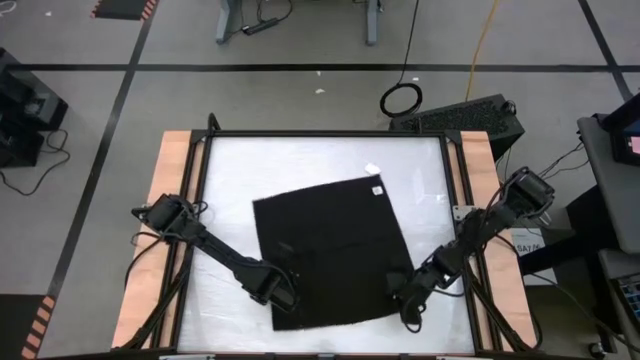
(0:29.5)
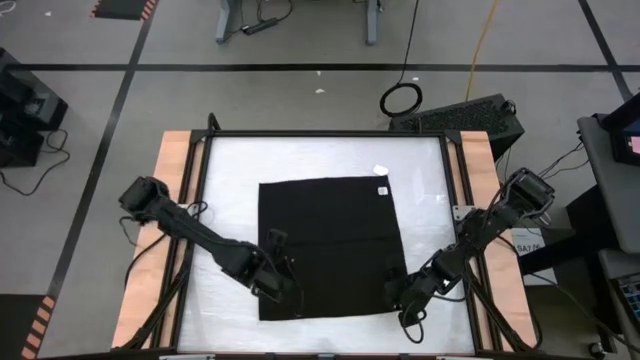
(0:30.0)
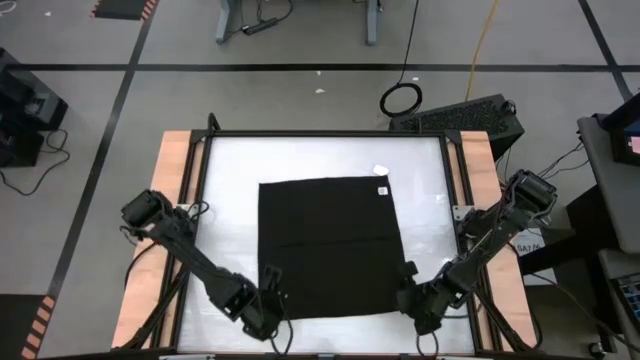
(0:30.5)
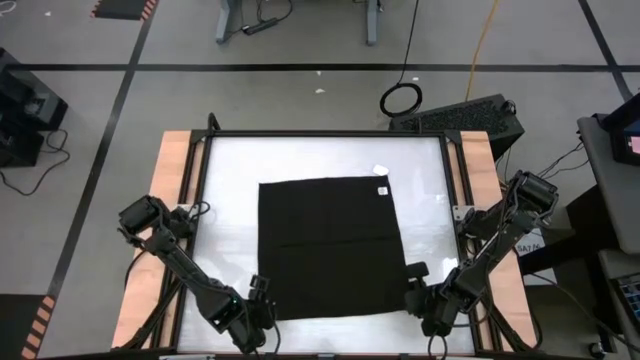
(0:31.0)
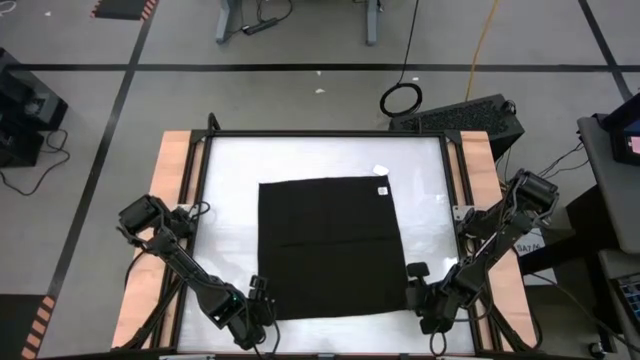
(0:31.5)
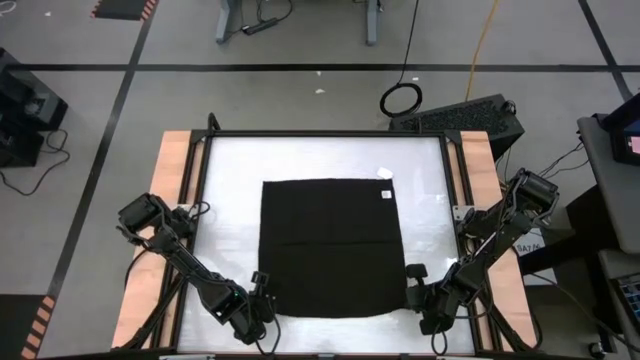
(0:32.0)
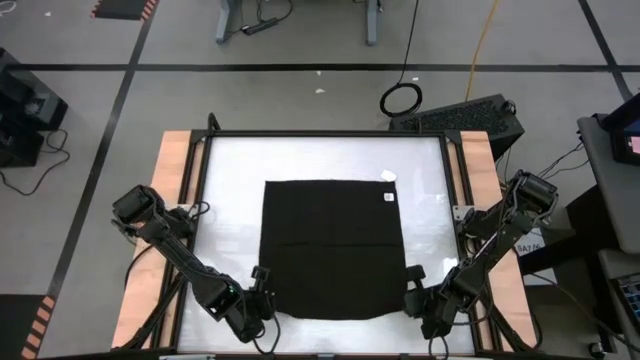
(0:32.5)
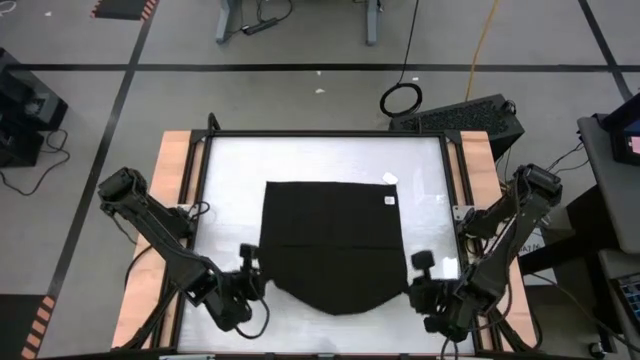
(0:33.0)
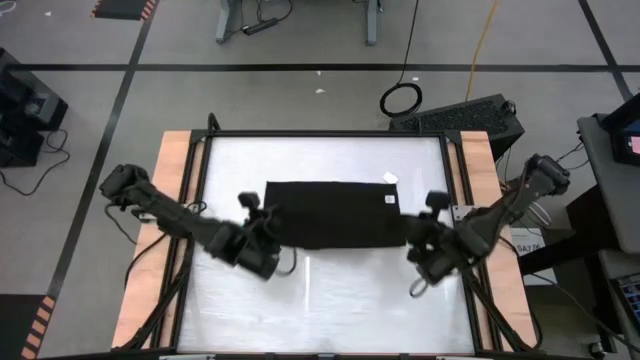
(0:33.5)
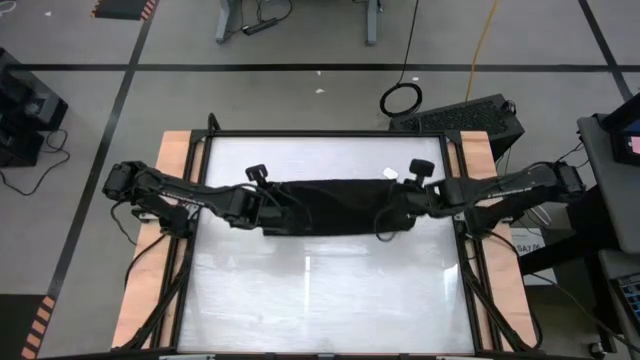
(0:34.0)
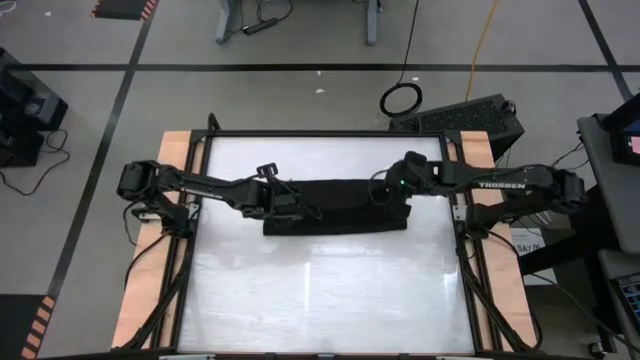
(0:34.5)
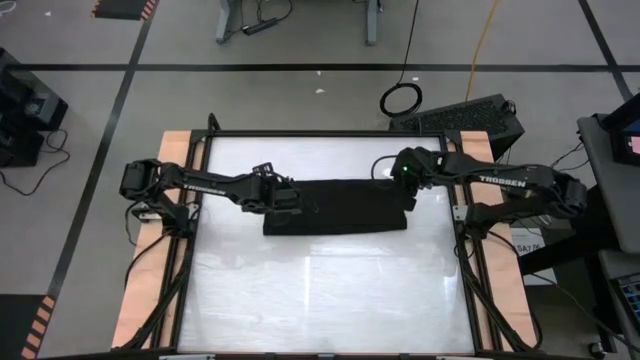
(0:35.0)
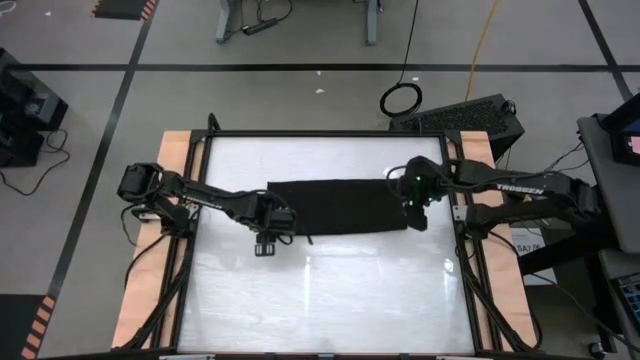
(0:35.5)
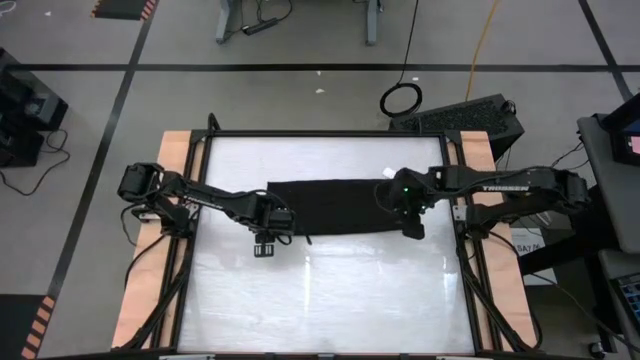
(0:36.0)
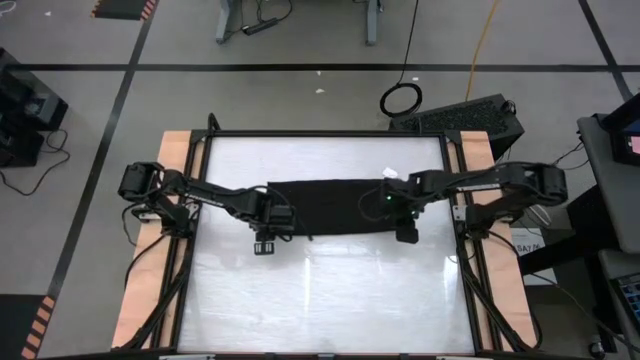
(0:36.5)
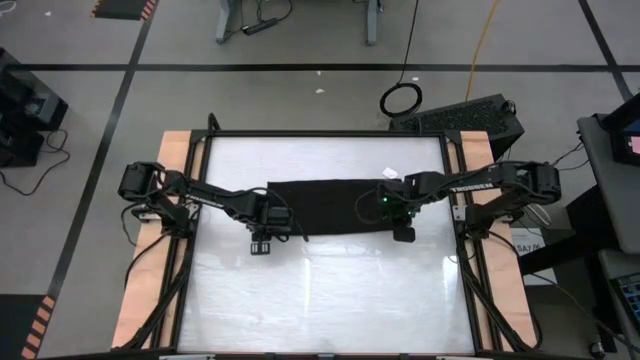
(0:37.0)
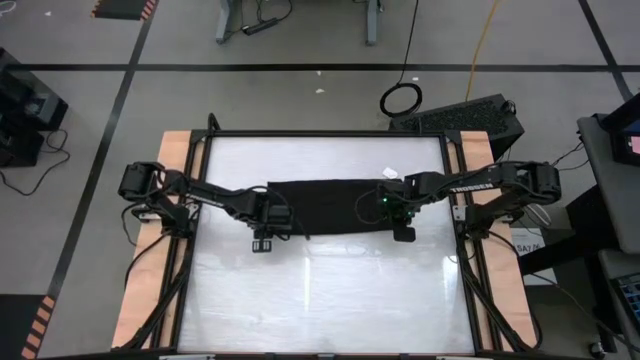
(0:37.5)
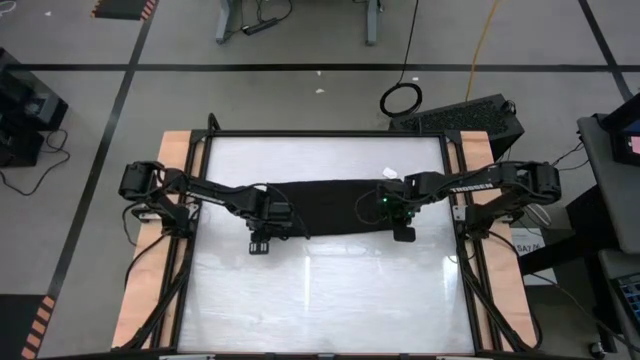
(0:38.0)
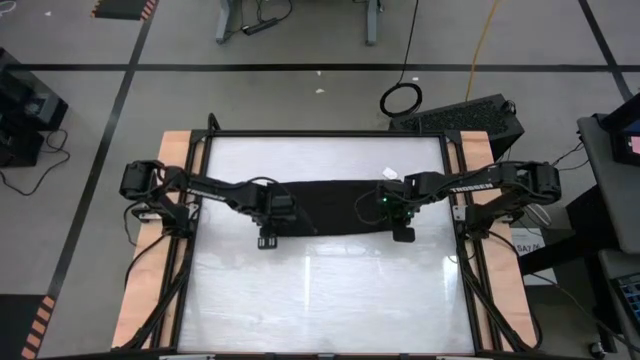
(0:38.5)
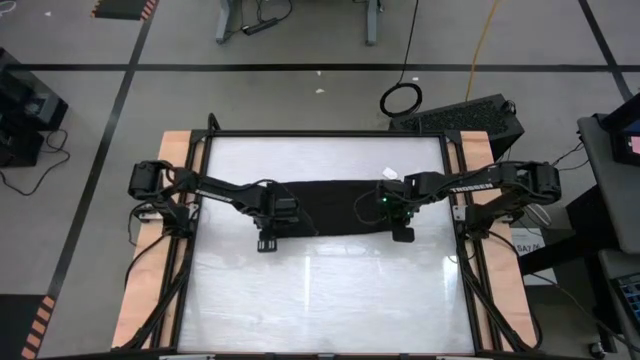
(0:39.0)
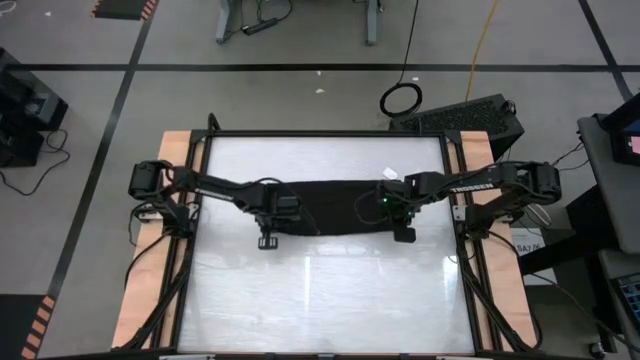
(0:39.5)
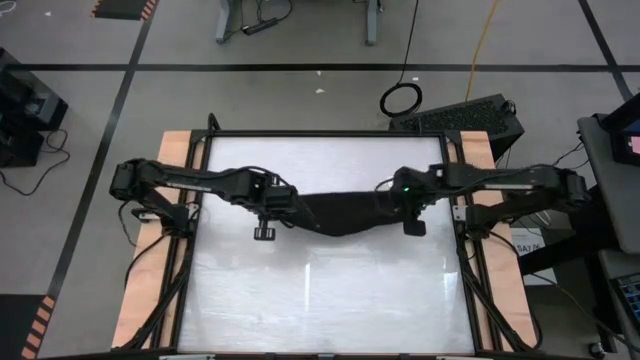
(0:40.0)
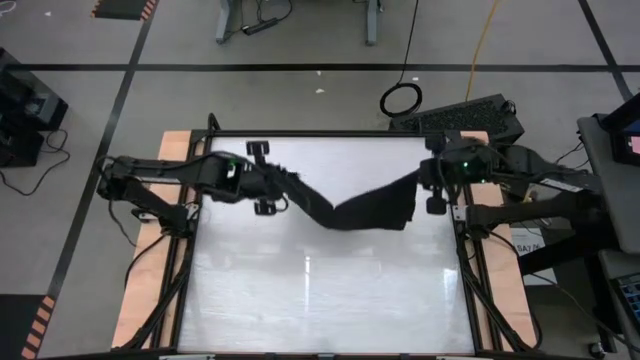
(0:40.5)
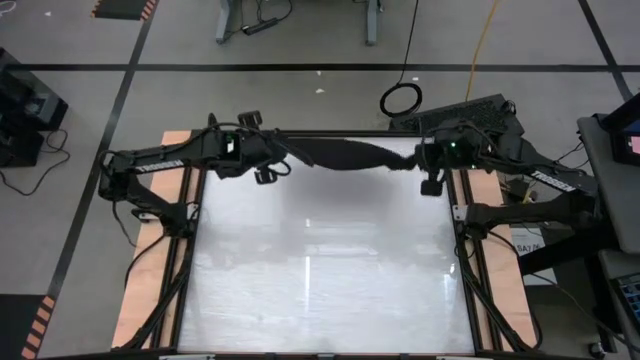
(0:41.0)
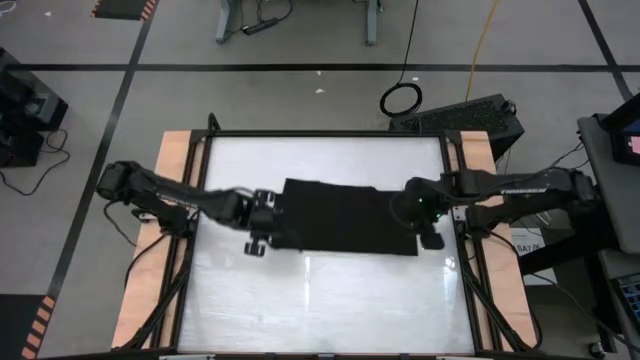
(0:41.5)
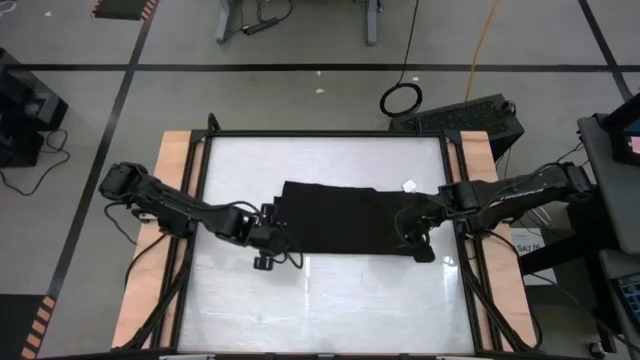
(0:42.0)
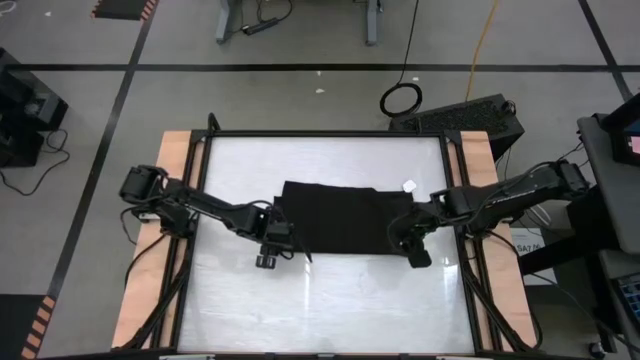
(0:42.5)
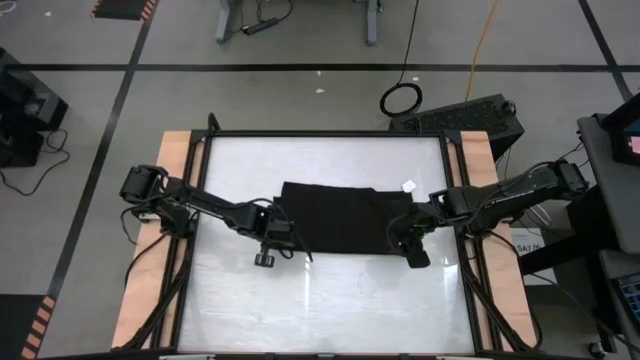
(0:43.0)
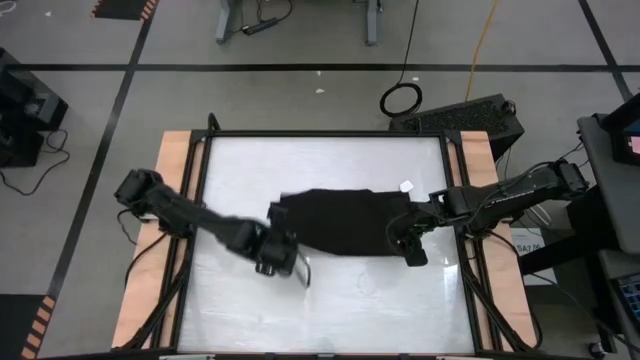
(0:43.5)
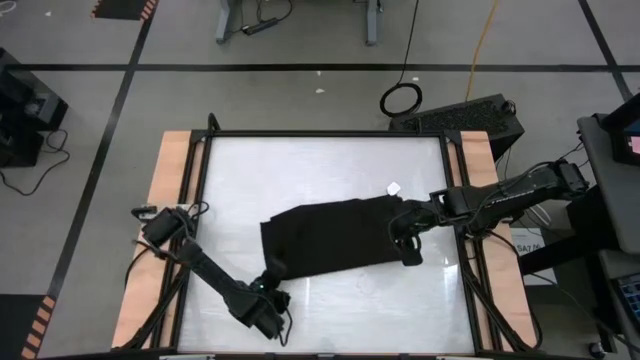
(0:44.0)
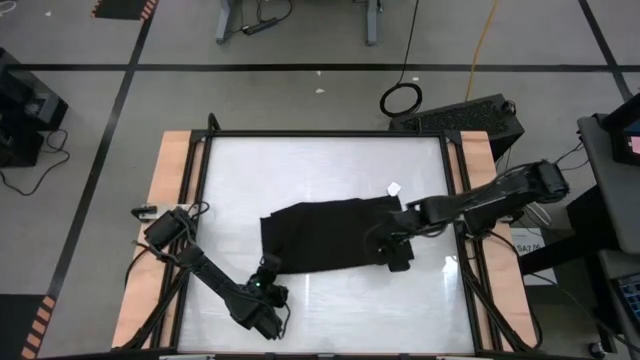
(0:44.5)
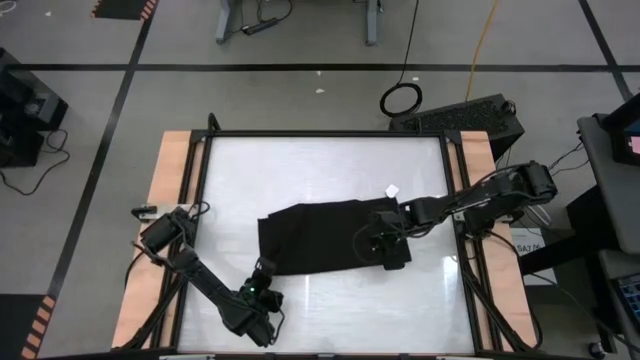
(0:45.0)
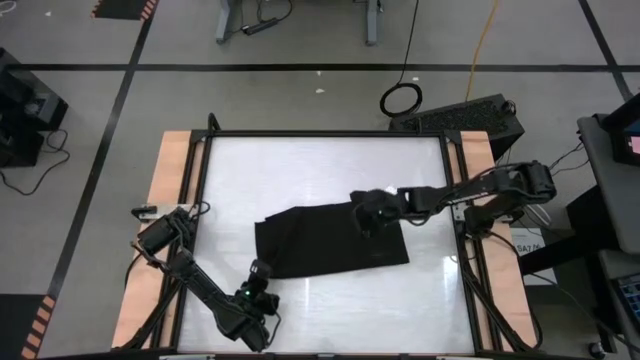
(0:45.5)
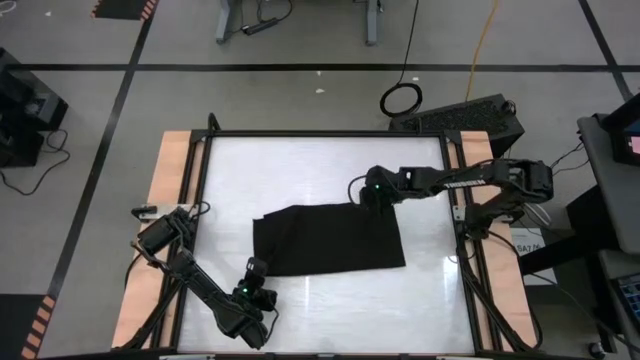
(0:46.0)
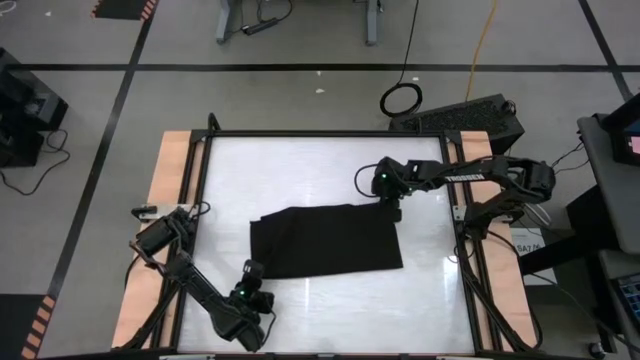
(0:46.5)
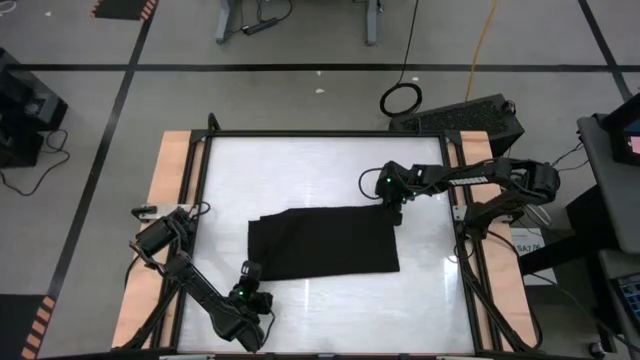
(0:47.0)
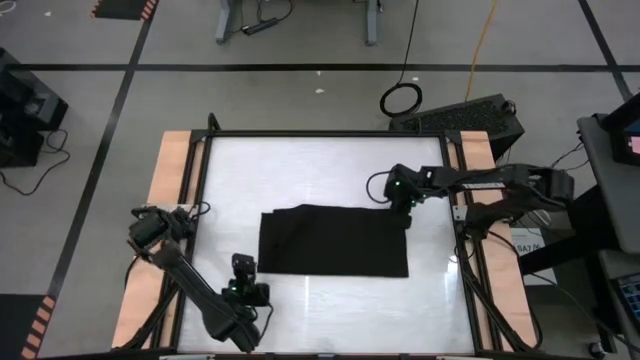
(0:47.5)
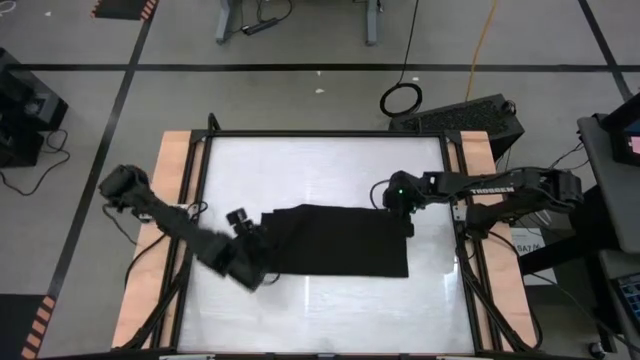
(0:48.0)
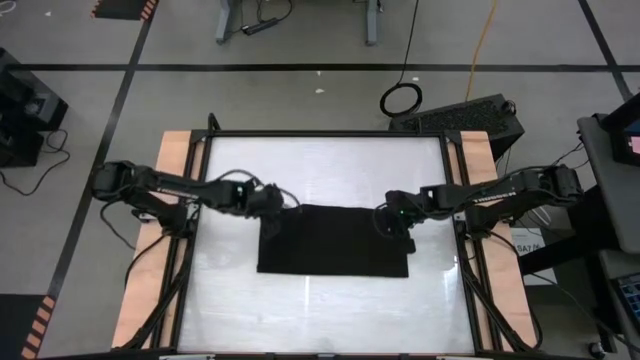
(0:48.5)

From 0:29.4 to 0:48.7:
Task: Roll towel
Roll the towel
